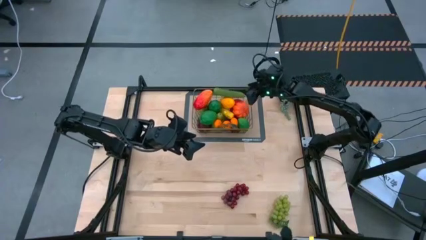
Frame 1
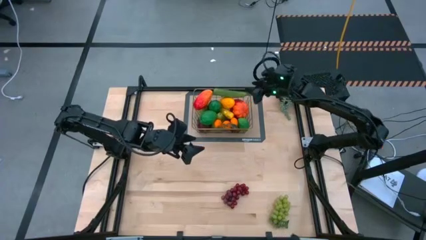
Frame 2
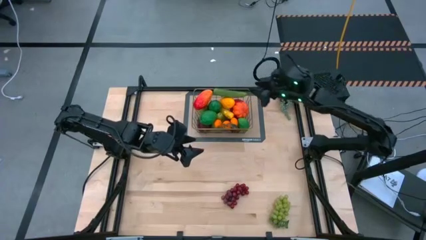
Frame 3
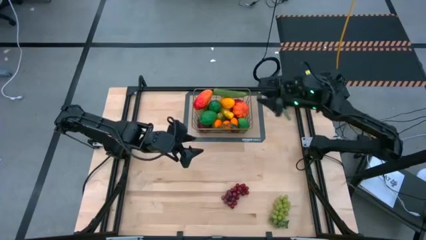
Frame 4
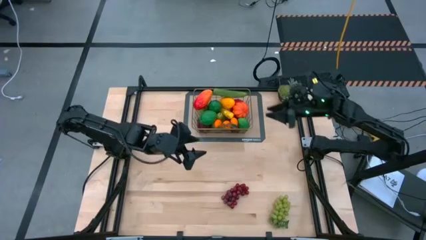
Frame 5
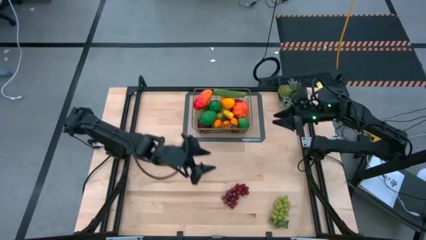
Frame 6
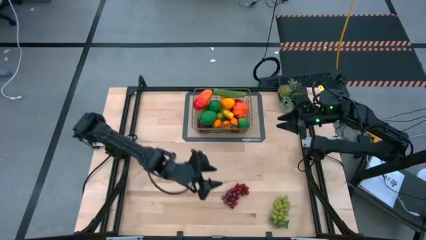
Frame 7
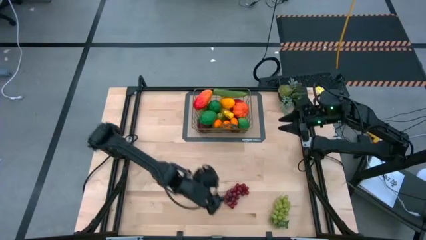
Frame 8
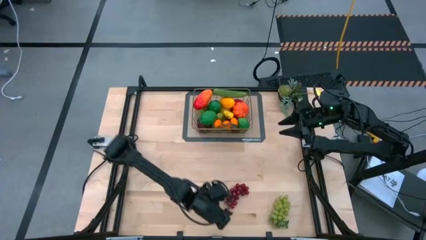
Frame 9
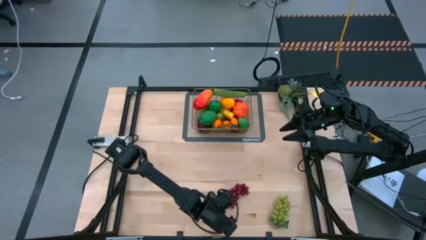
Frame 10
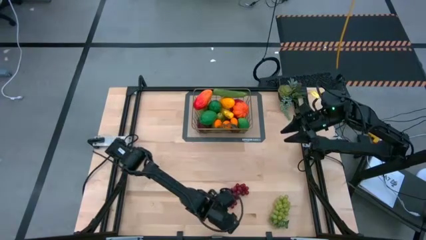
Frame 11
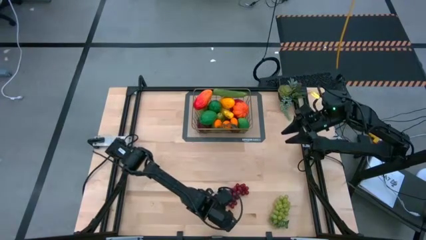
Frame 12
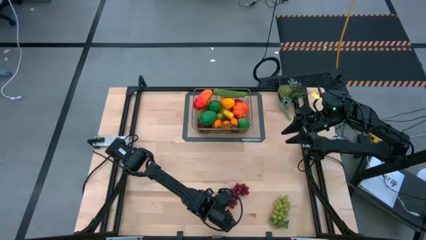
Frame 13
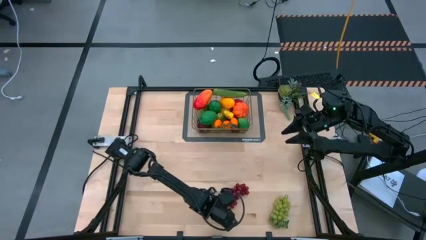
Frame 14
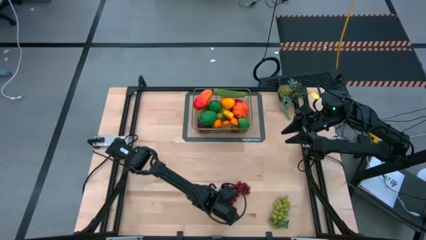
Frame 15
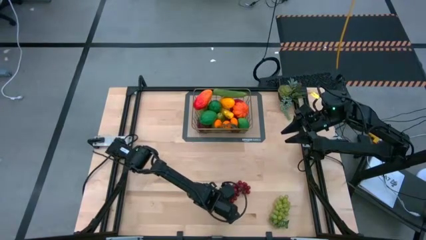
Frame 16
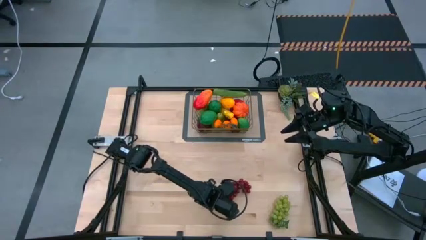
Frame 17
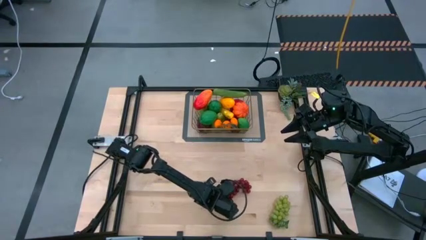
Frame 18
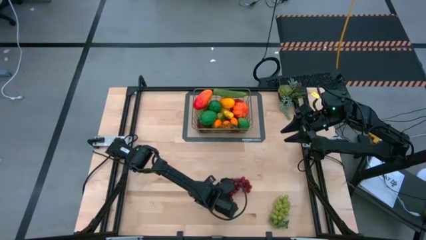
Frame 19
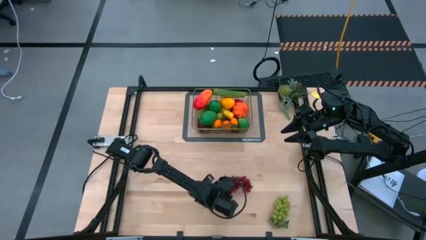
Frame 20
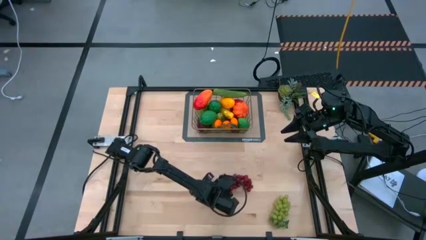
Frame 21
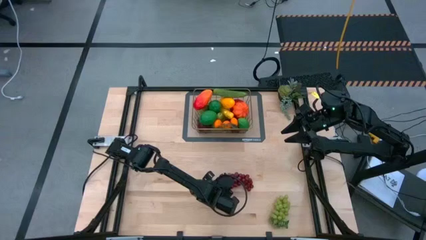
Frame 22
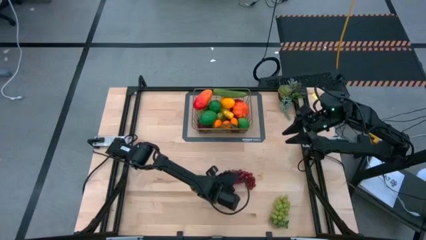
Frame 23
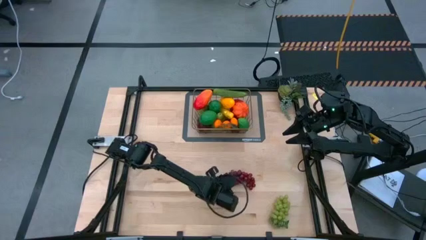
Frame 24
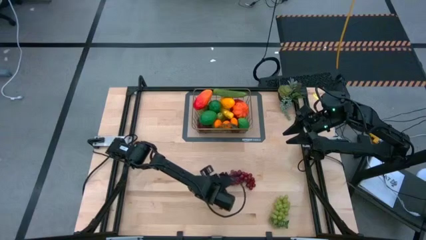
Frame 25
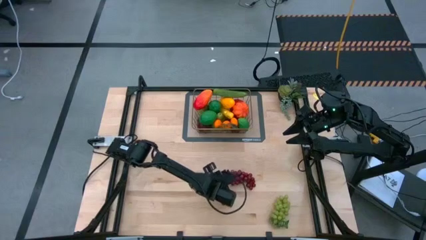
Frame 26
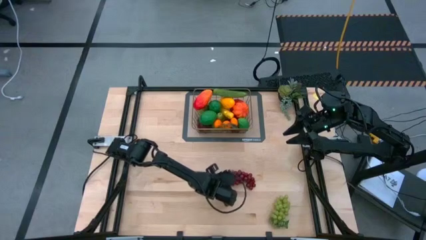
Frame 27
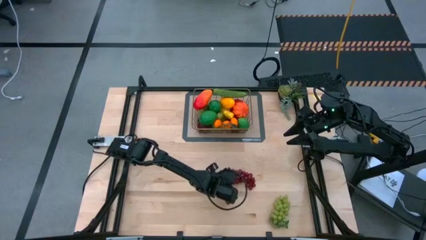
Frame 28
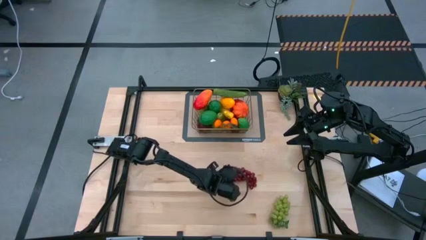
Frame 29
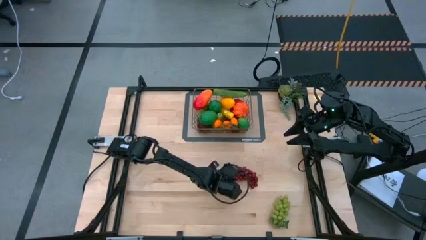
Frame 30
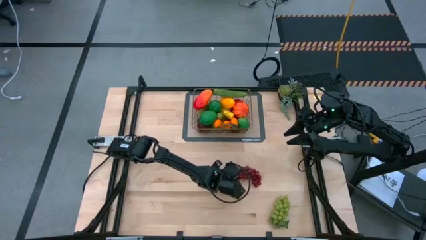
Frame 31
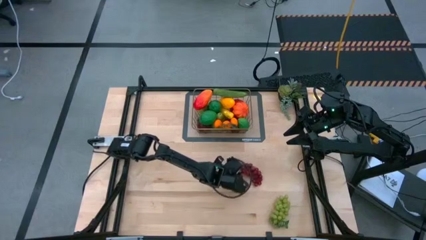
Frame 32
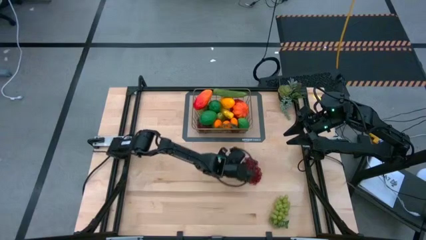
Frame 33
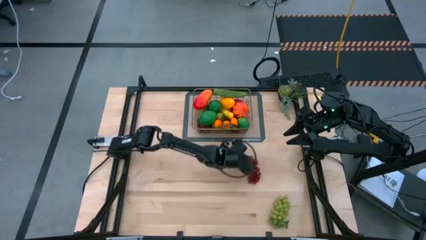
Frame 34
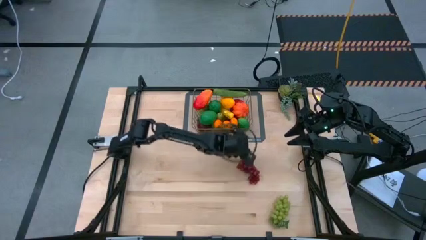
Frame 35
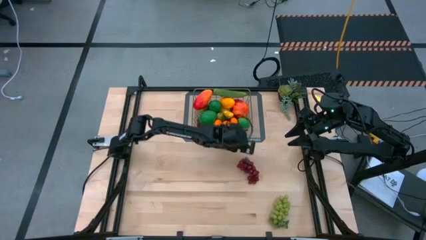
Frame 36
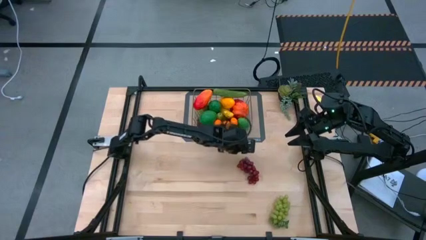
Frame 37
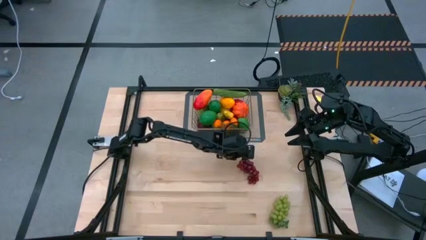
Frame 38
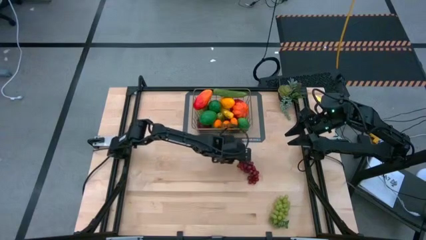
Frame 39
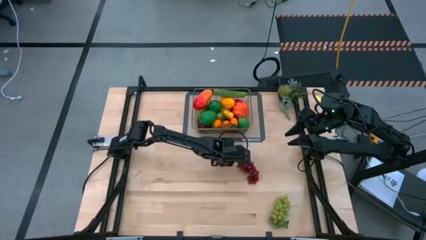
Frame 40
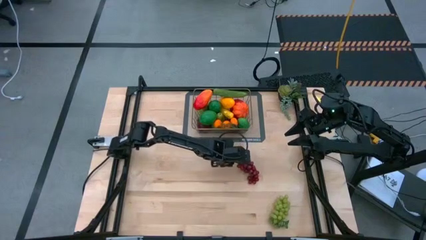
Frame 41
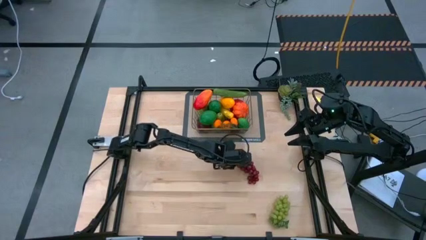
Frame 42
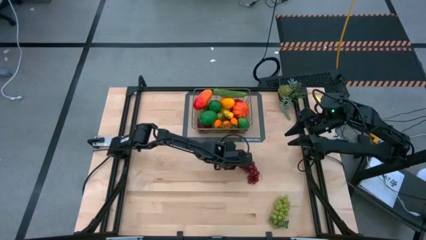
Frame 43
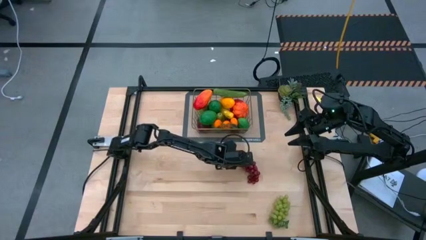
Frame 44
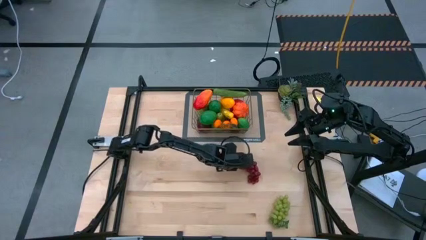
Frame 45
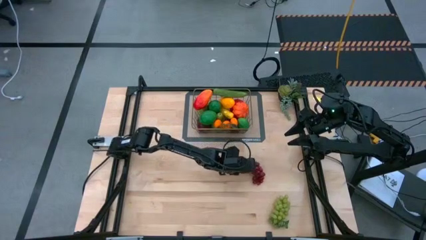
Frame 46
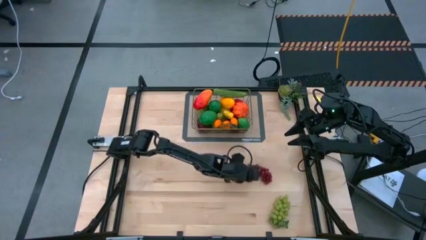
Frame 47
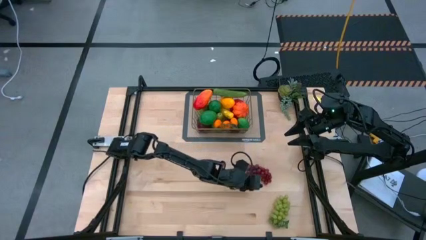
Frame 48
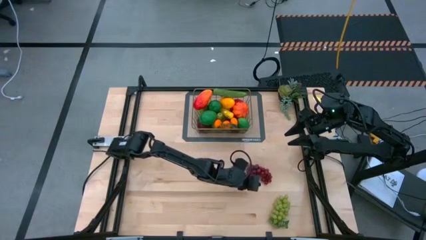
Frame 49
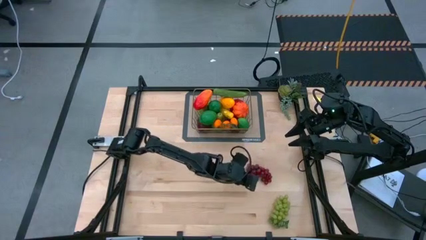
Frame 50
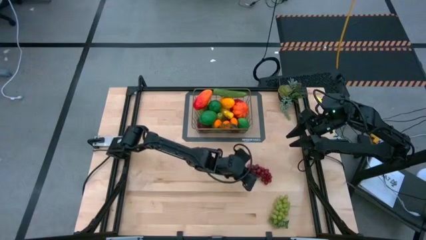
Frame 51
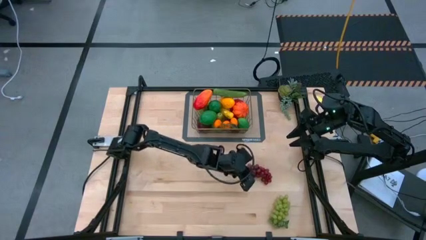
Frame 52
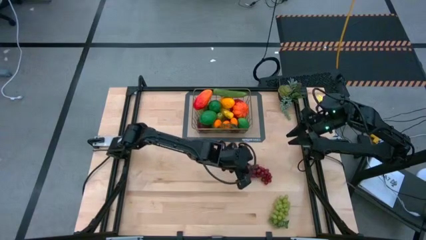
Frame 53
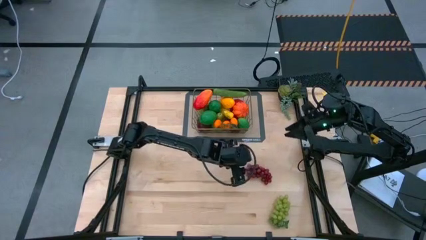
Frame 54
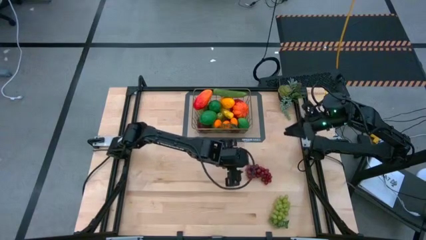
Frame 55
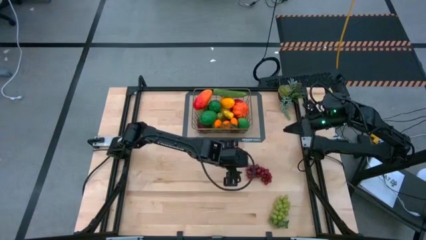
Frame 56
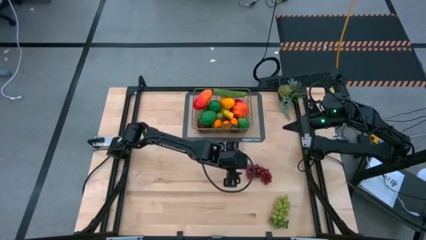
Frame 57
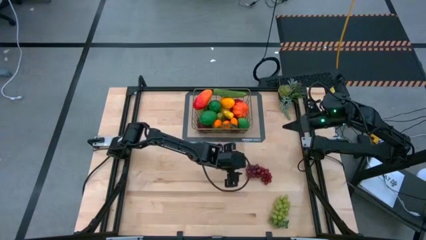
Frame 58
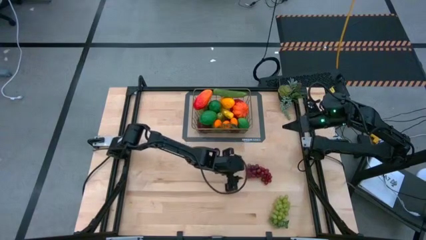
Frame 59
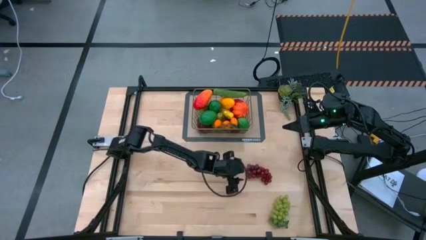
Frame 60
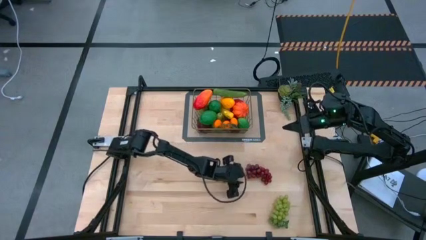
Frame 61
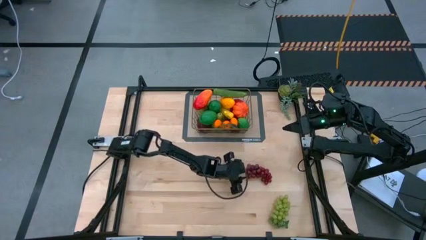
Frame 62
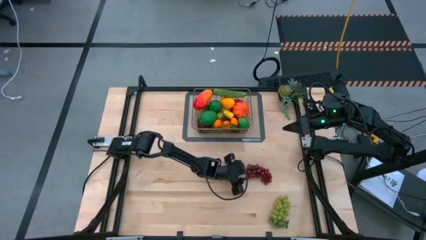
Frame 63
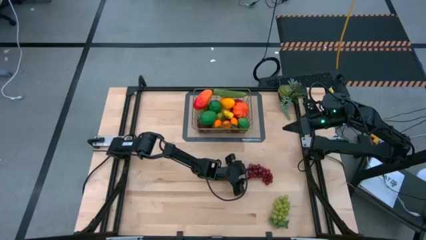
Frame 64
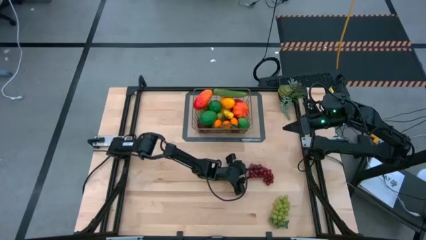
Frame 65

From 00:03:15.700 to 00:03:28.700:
Task: Build produce basket
Put the red grapes into the brown wire basket

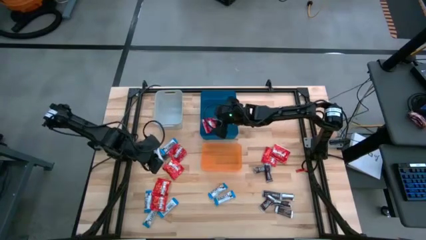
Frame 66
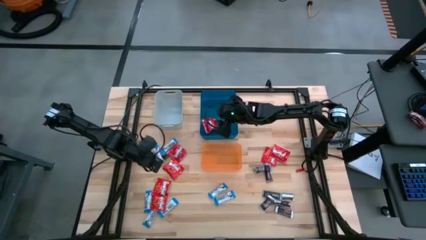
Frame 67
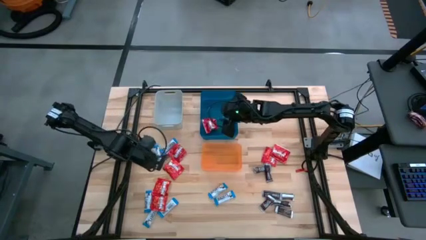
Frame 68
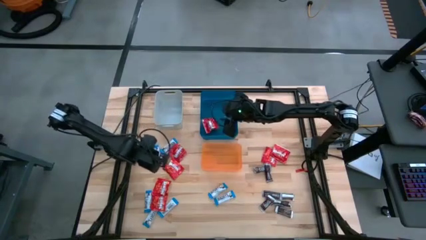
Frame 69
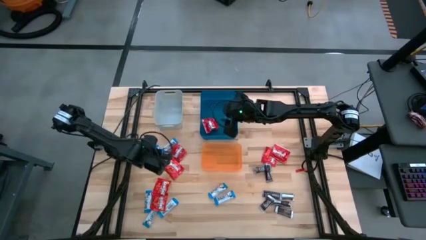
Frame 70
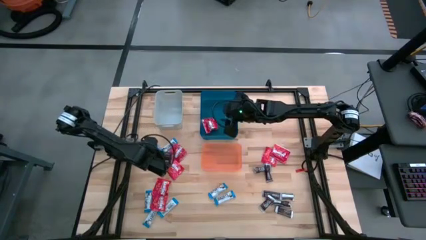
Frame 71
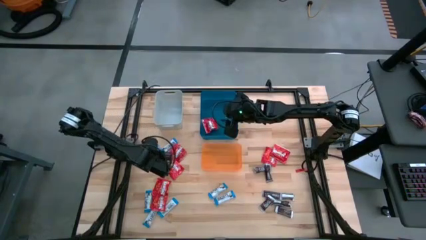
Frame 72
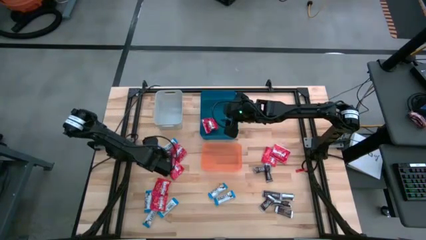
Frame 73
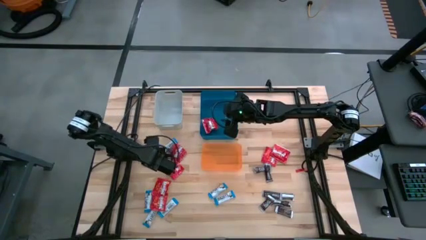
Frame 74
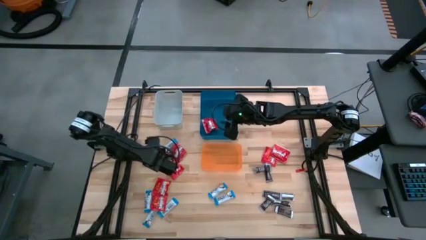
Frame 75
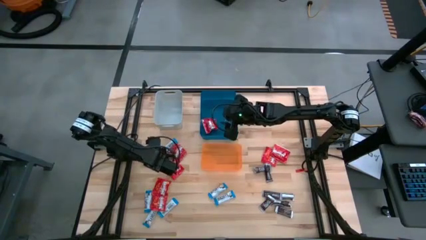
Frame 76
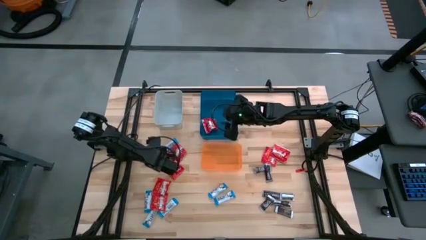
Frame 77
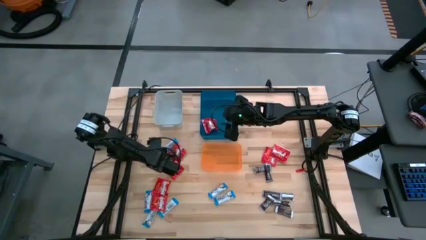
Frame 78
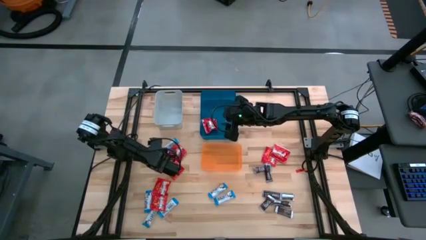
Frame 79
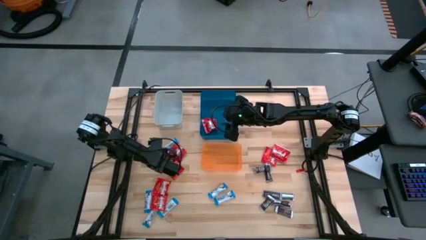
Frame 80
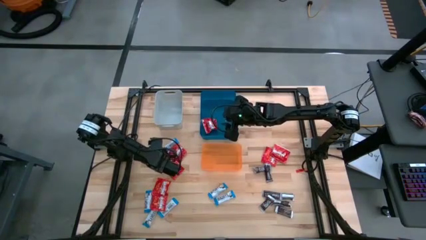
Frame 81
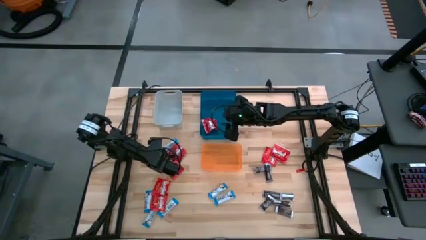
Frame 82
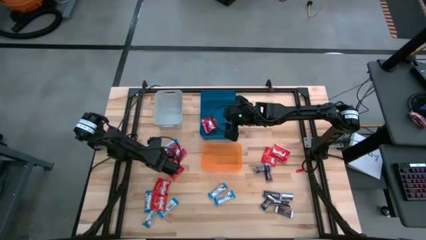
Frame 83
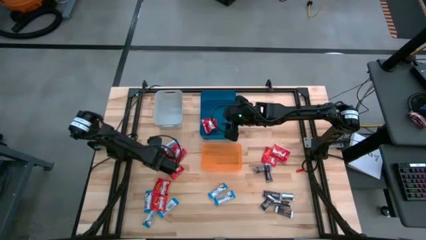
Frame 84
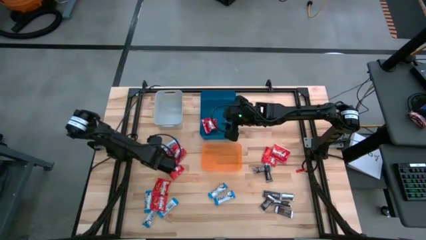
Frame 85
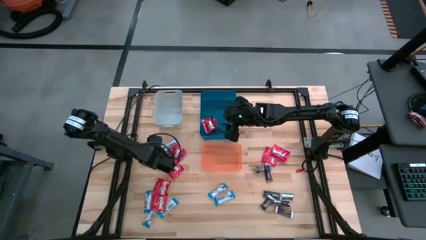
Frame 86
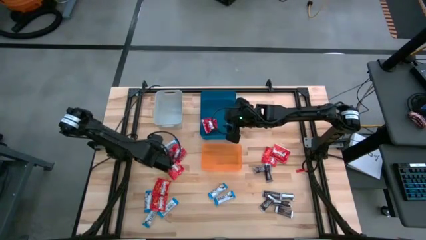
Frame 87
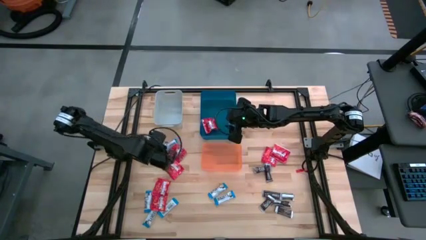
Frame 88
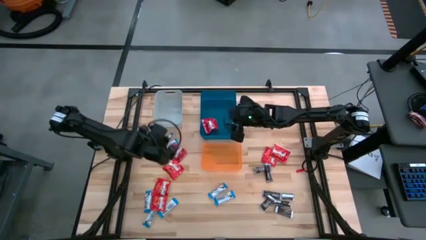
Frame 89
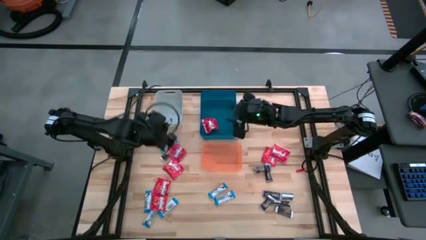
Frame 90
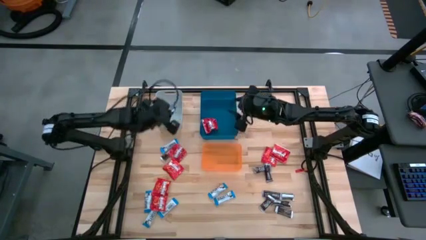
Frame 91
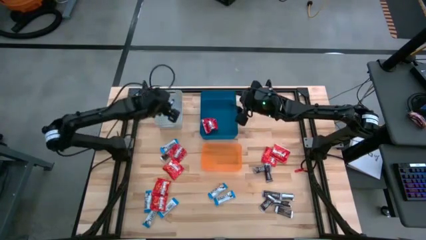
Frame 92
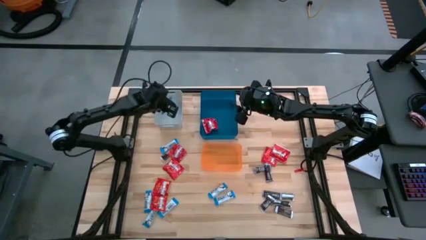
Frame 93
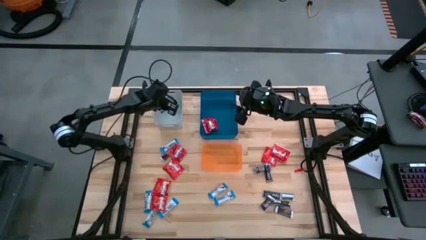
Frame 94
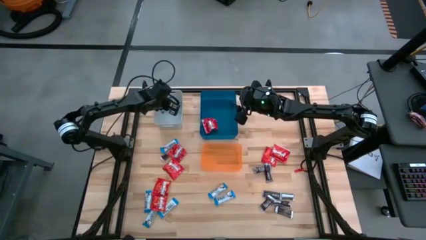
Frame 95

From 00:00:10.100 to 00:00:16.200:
Task: Sort candy
Put the blue chocolate bar into the gray bin
